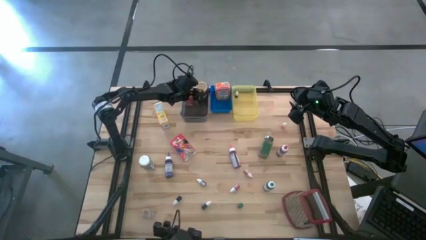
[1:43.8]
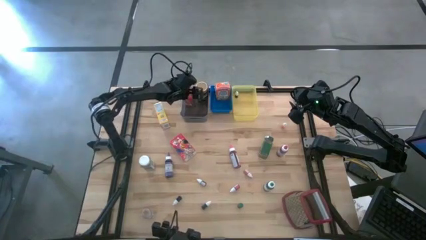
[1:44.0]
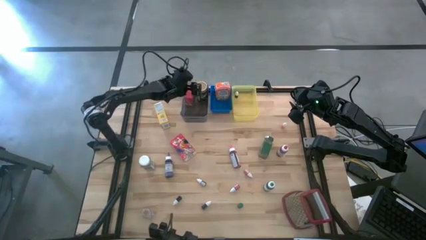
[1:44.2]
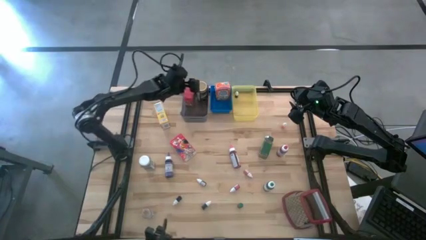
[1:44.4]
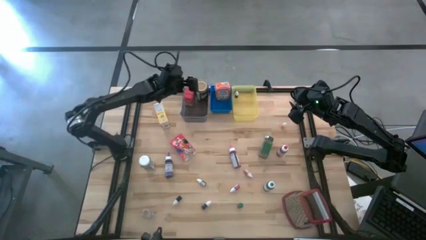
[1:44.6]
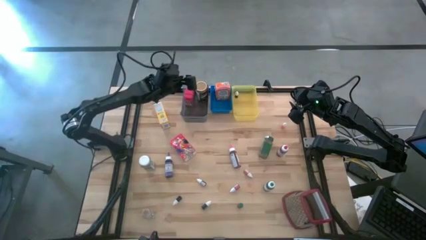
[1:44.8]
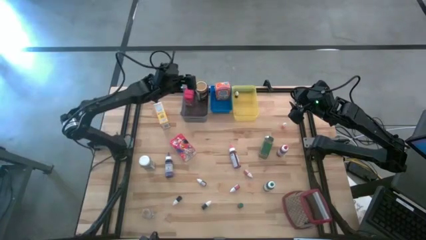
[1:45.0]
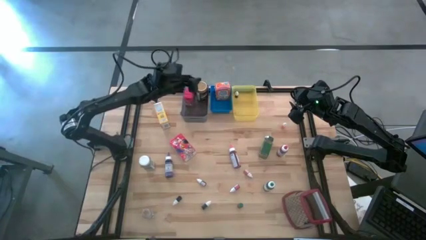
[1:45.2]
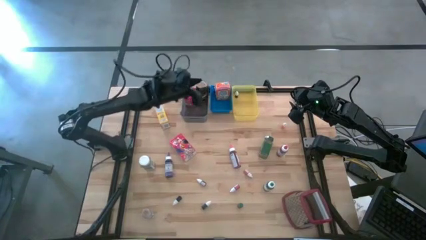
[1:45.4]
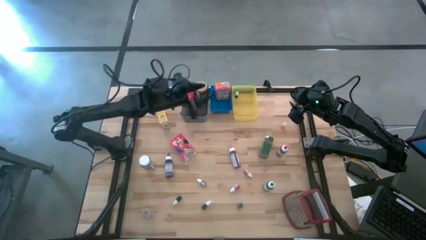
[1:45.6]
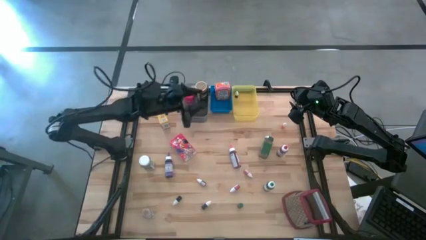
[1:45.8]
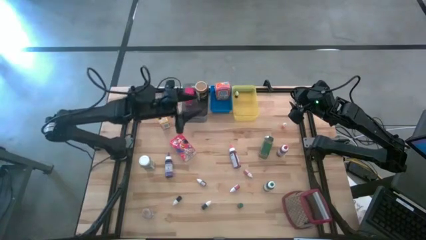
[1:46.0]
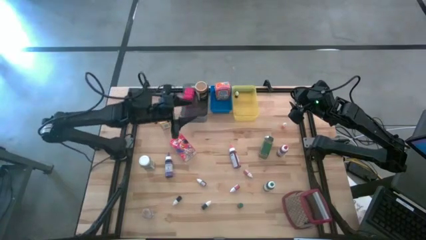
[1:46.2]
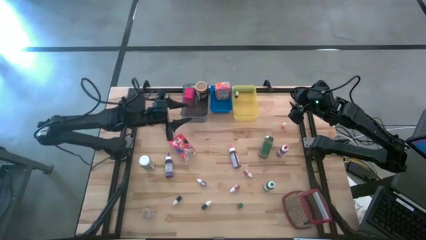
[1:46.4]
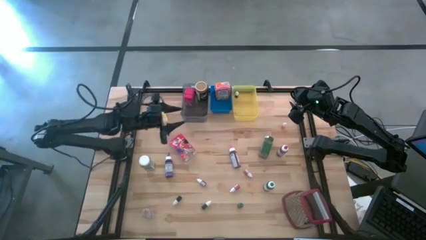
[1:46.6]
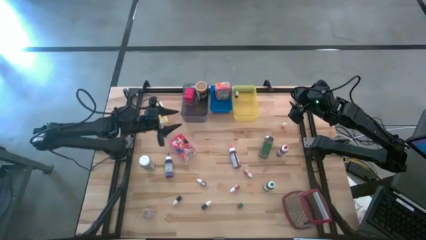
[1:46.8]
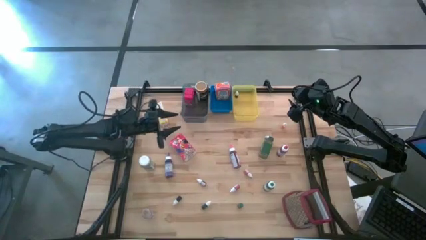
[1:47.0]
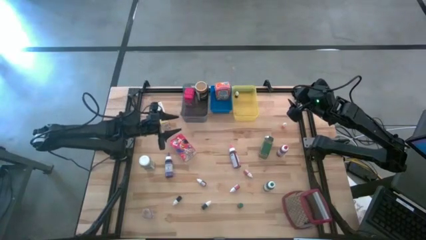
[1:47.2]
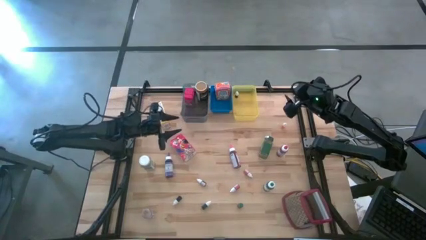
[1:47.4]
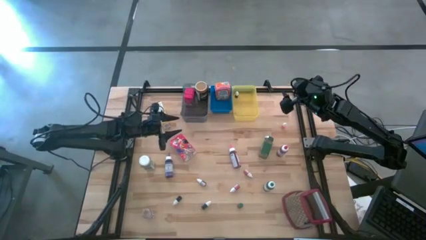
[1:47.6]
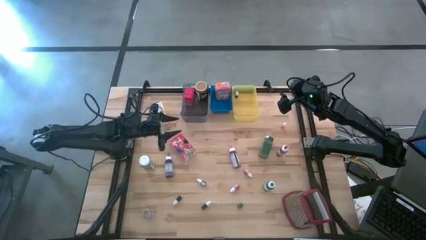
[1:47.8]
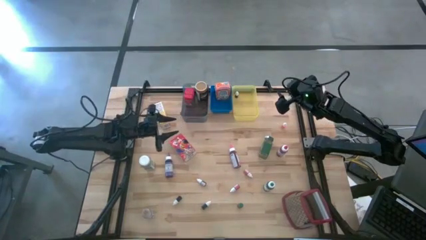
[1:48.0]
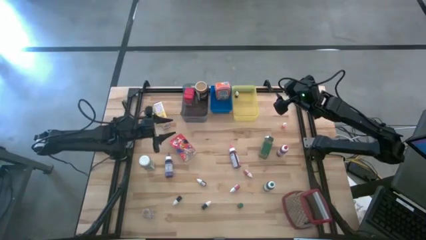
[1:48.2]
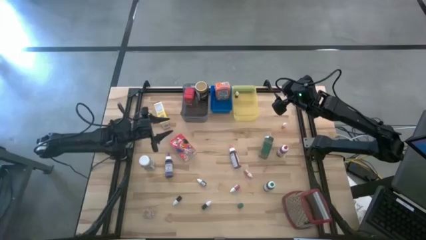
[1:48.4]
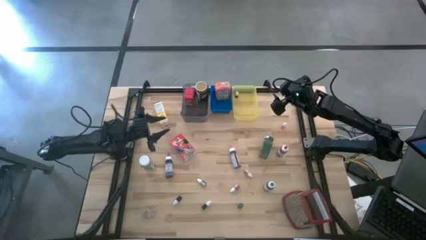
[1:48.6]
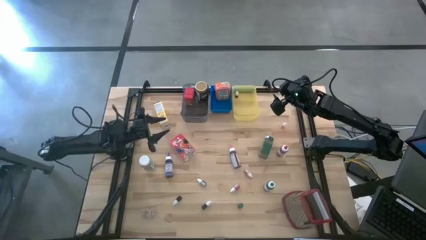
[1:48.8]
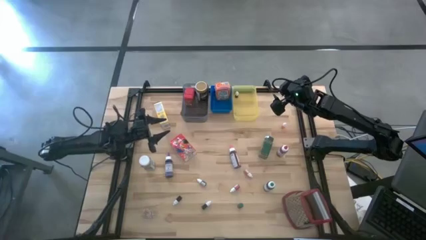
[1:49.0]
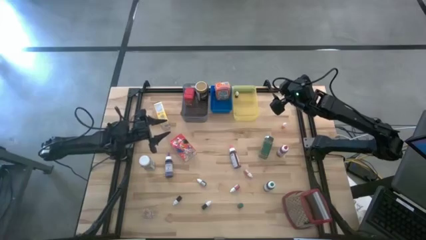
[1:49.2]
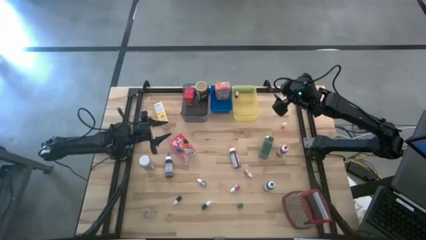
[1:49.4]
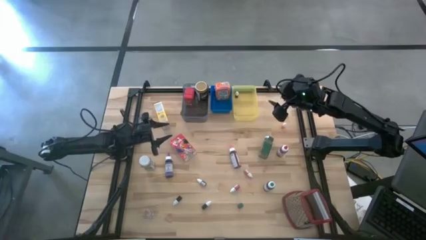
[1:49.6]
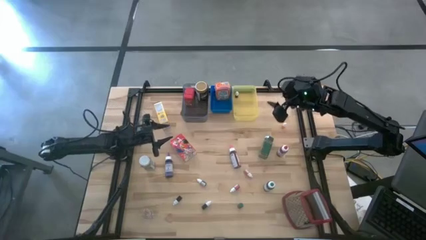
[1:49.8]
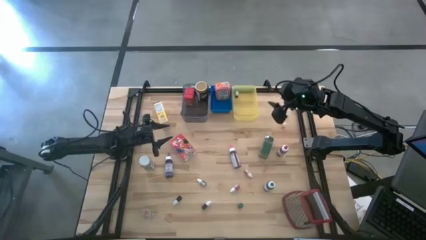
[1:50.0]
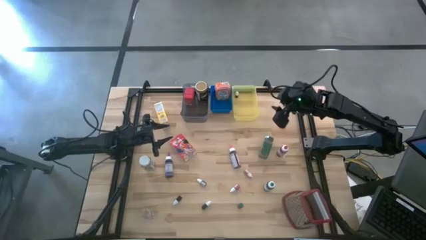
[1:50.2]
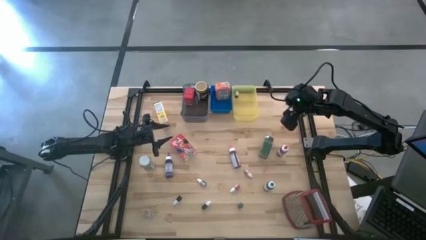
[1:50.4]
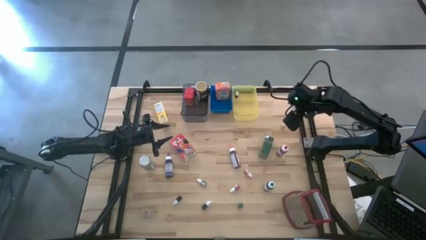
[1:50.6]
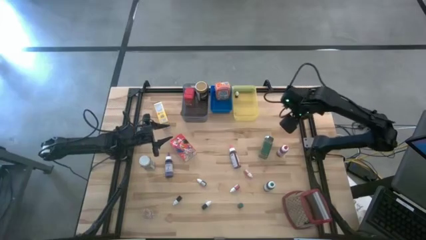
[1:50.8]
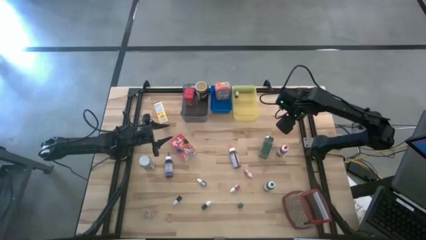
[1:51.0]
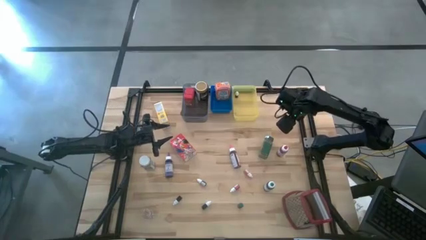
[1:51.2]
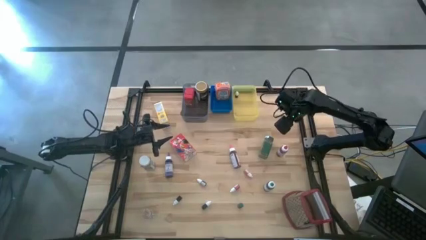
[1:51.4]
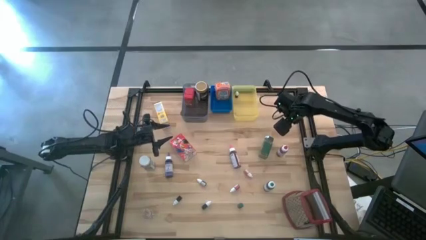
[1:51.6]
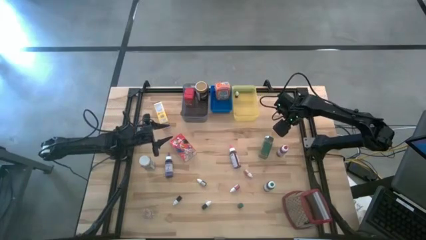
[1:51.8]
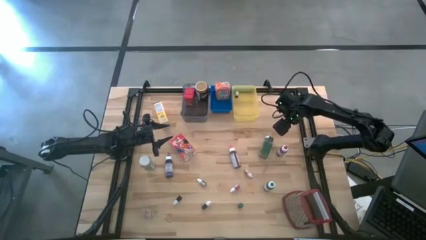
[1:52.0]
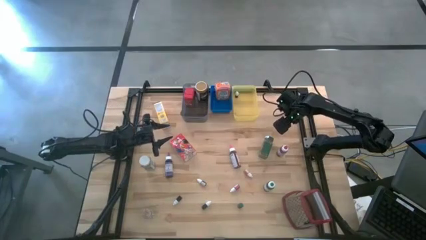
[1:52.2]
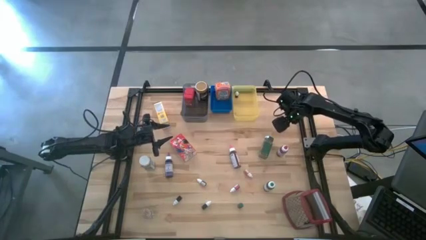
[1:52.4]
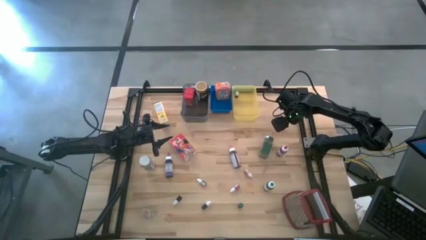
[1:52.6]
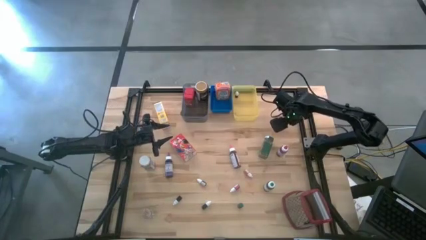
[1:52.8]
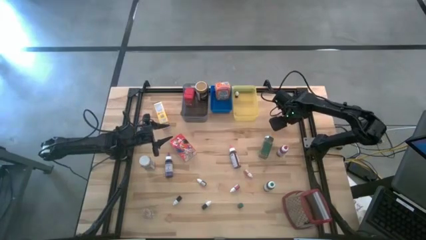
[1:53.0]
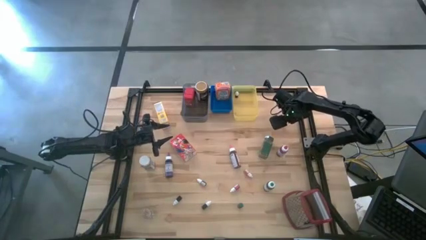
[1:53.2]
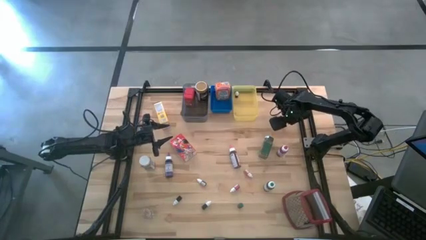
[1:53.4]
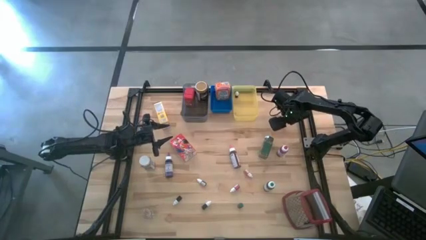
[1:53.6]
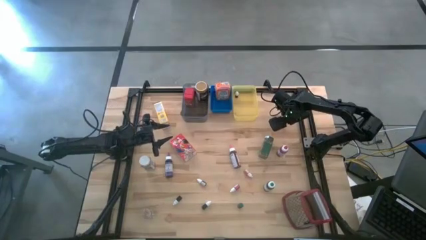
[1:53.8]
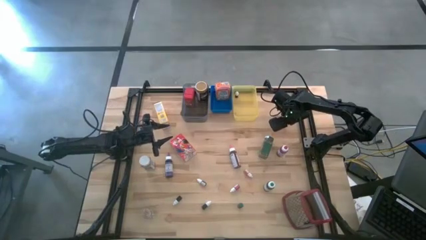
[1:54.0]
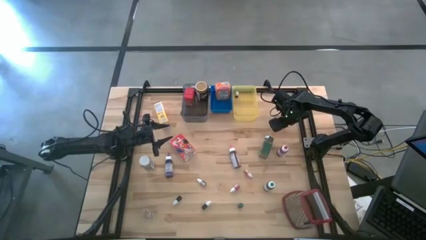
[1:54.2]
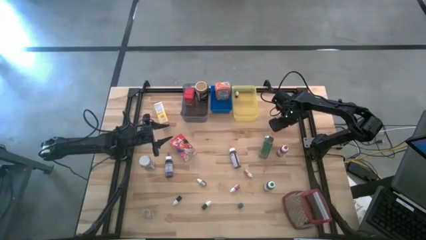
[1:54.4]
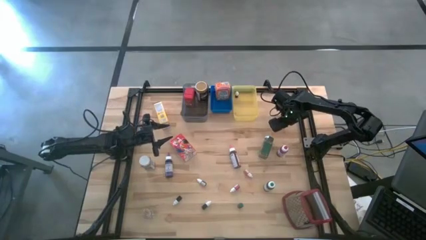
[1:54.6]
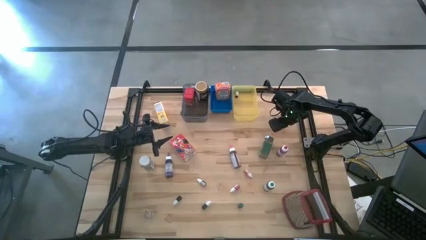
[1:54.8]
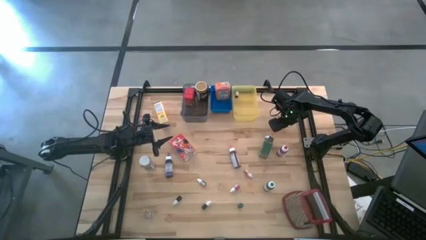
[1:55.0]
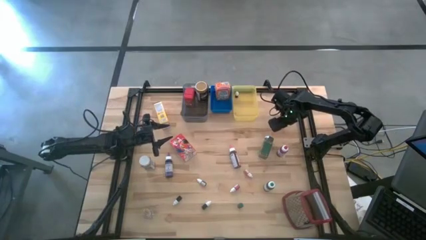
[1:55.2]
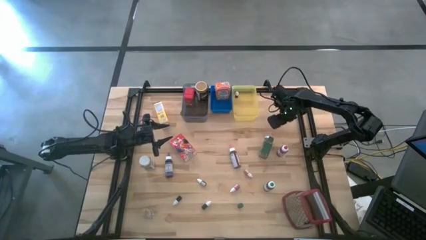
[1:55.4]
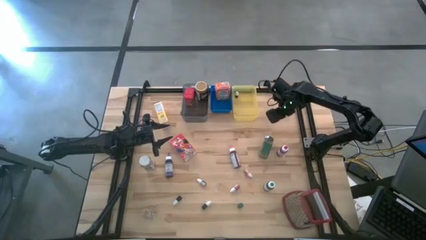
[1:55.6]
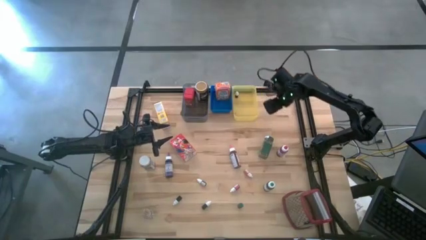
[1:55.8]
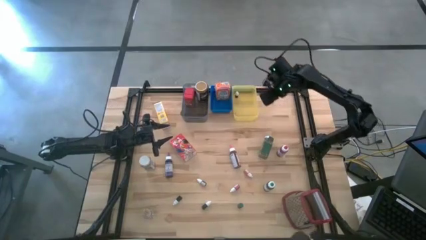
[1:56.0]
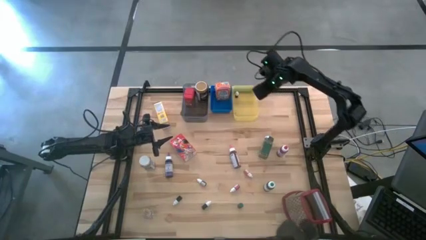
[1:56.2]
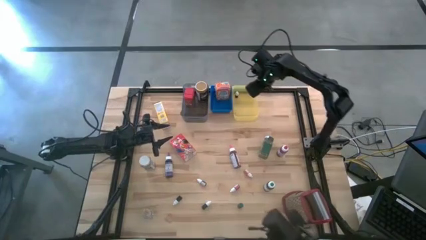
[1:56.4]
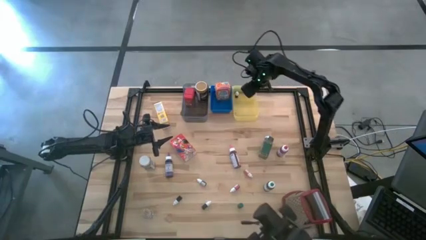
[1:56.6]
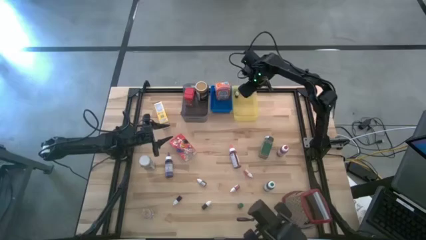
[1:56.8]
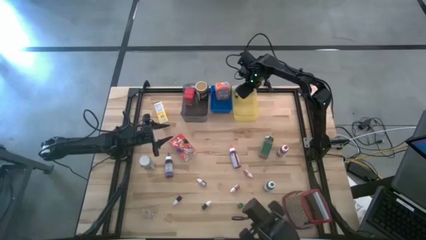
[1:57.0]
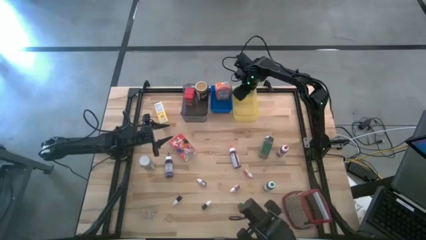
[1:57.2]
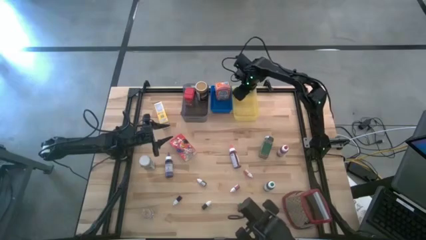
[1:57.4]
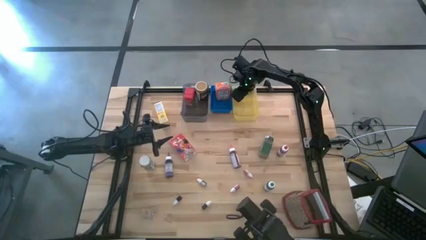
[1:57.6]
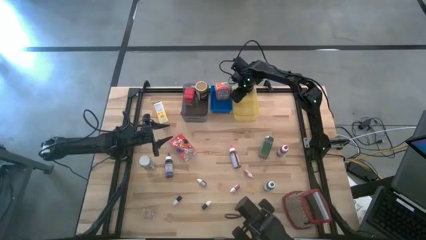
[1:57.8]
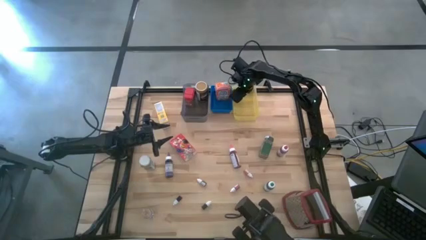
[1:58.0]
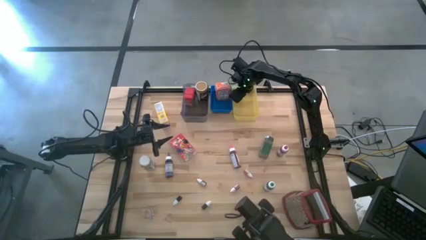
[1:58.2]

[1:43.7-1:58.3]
Task: Pick & Place Kitchen Items
Put the top orange food coloring bottle into the yellow bin
